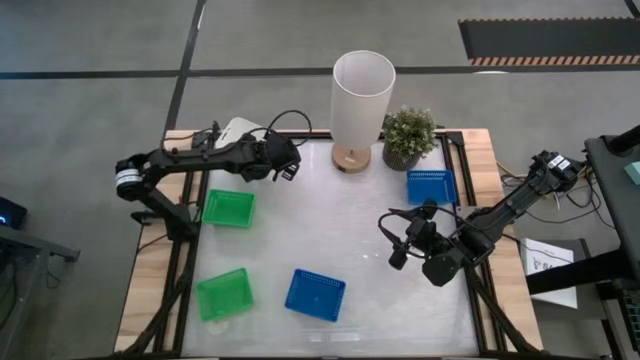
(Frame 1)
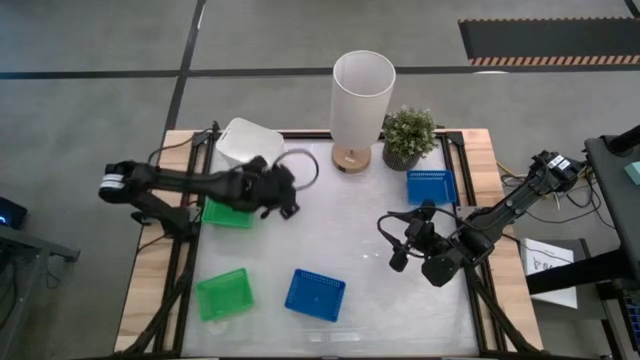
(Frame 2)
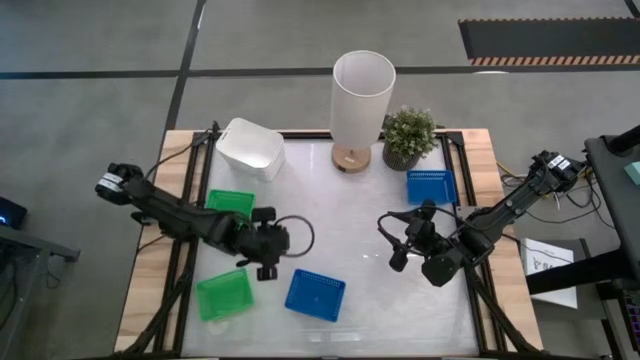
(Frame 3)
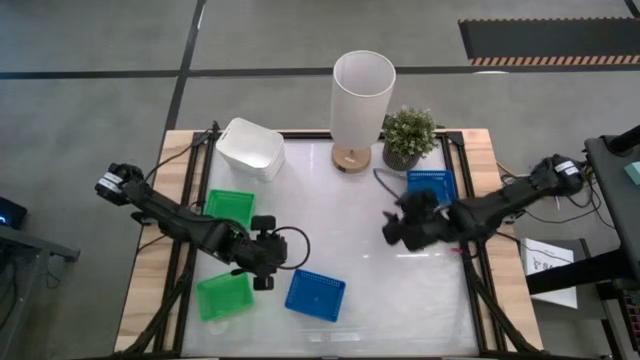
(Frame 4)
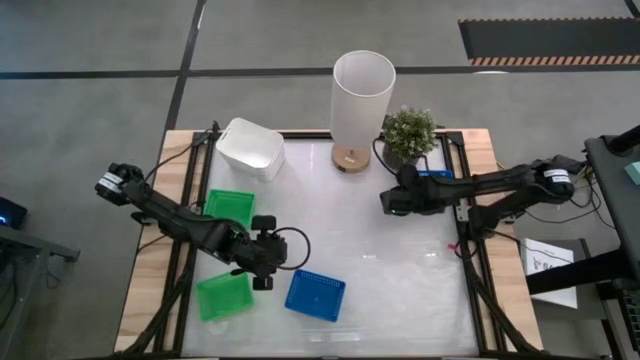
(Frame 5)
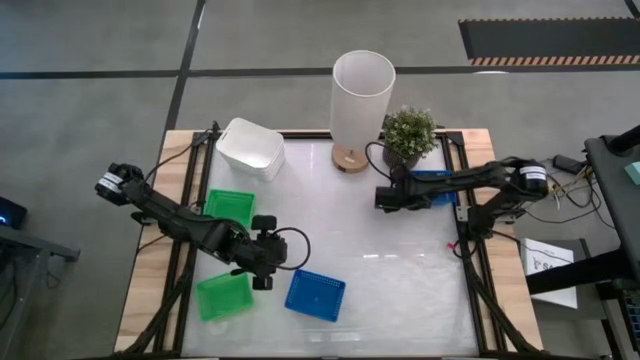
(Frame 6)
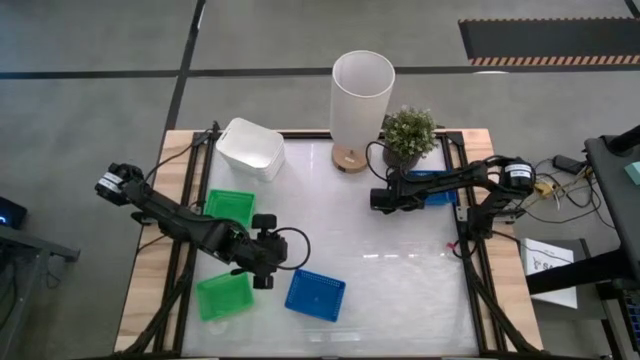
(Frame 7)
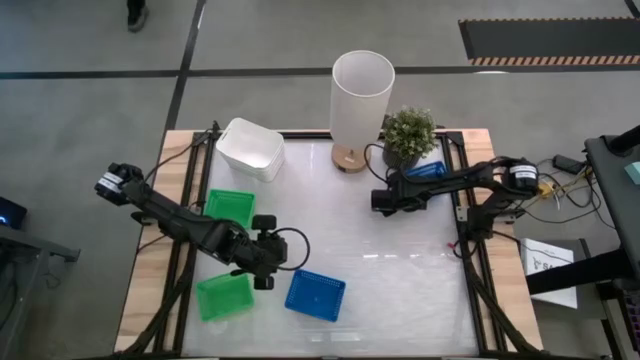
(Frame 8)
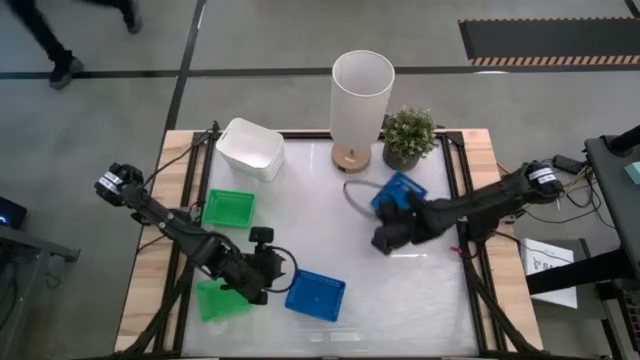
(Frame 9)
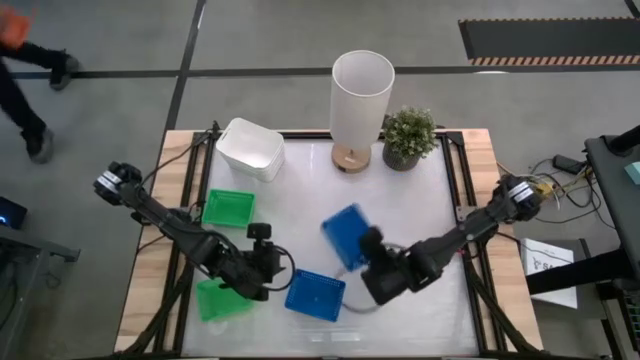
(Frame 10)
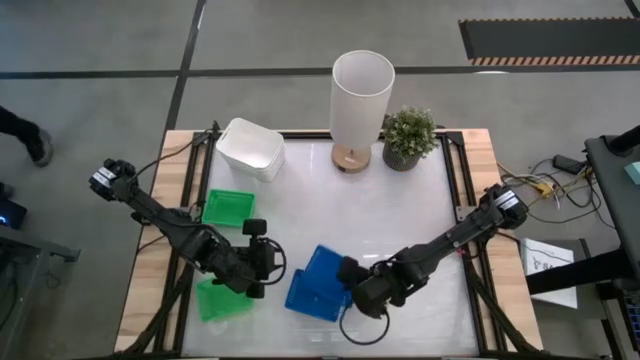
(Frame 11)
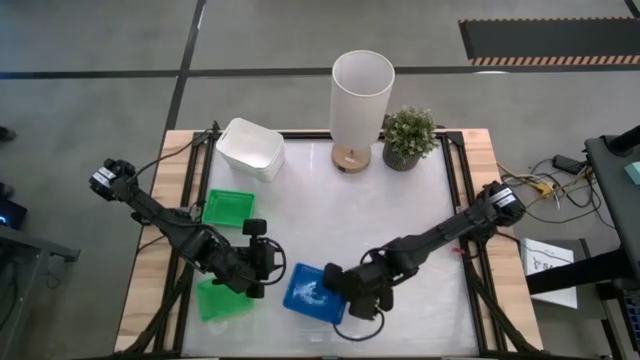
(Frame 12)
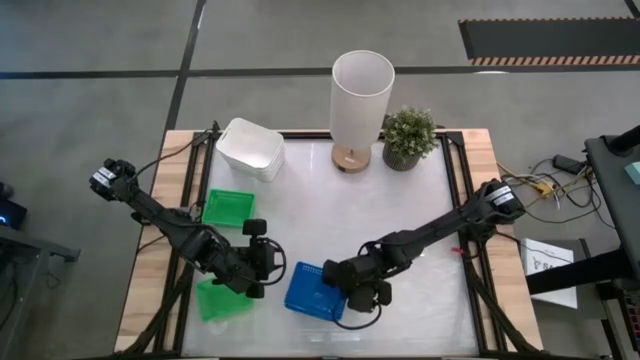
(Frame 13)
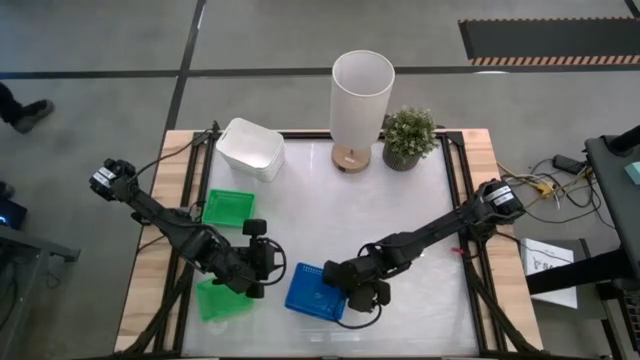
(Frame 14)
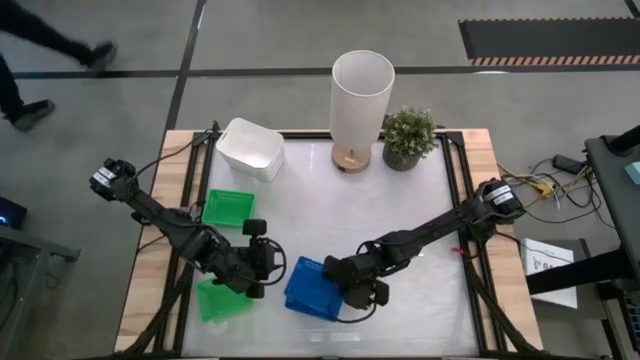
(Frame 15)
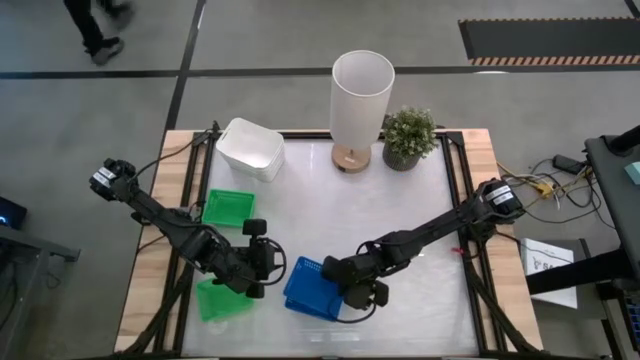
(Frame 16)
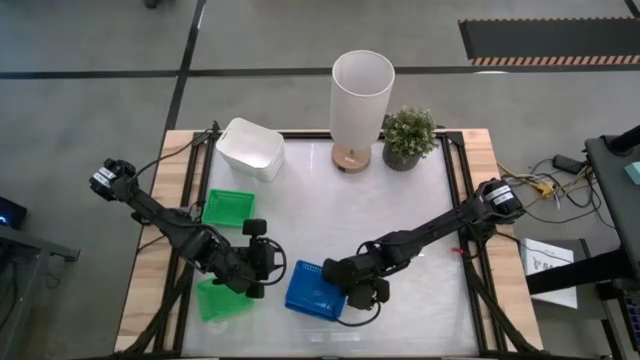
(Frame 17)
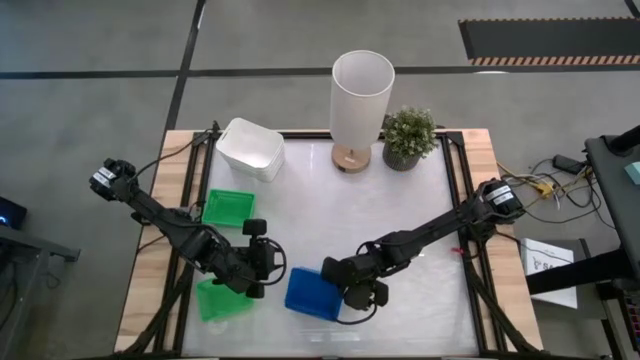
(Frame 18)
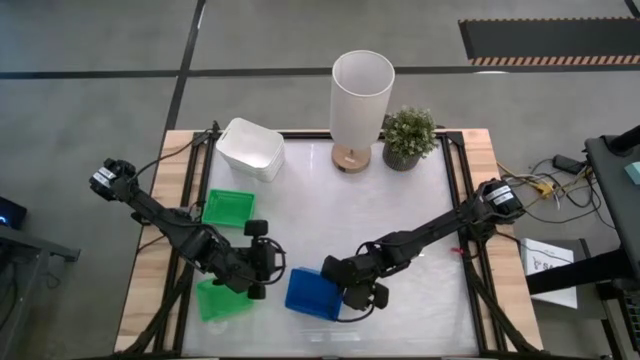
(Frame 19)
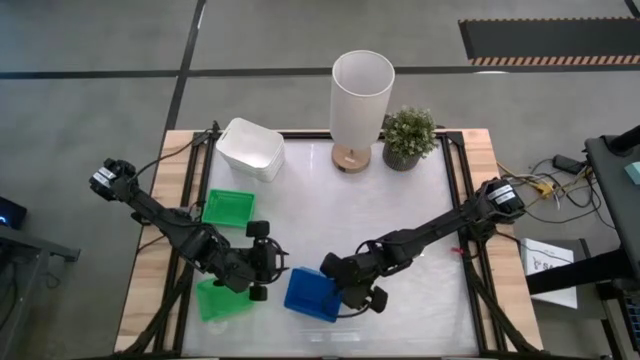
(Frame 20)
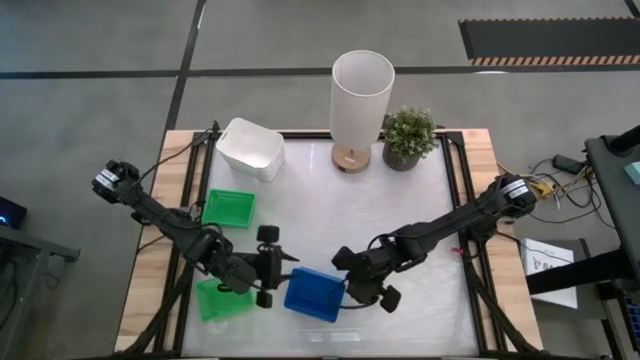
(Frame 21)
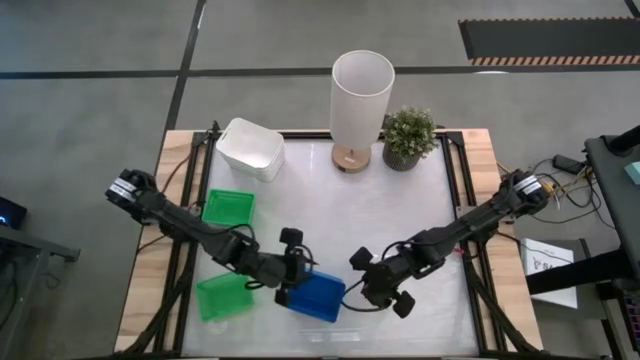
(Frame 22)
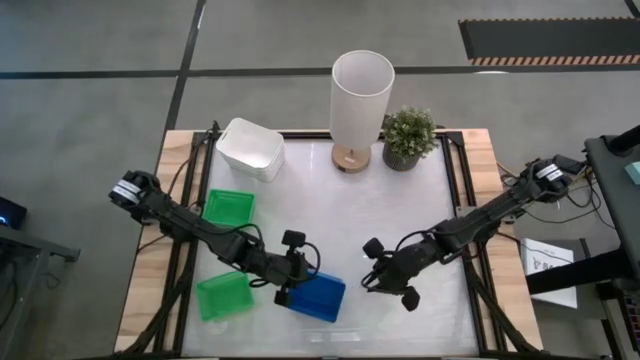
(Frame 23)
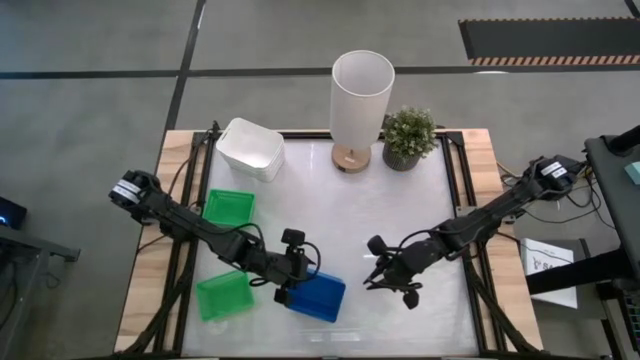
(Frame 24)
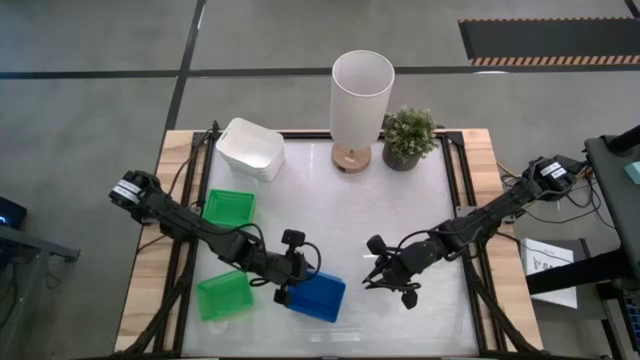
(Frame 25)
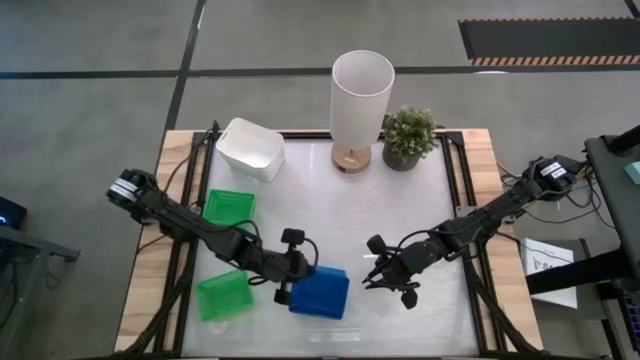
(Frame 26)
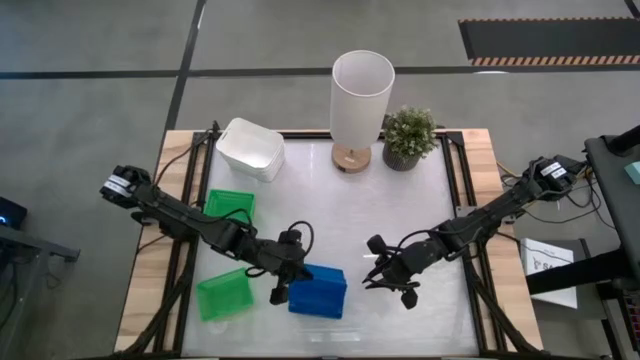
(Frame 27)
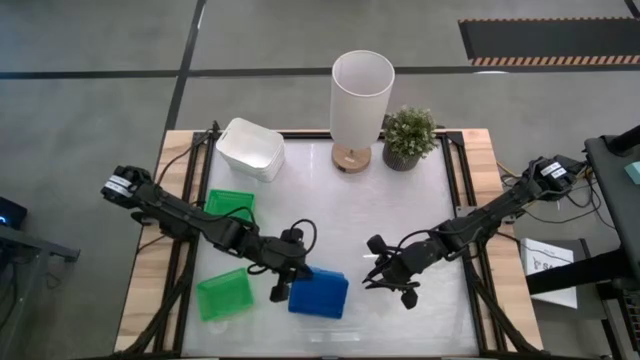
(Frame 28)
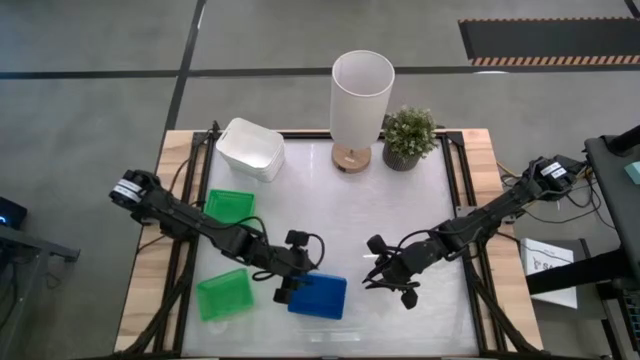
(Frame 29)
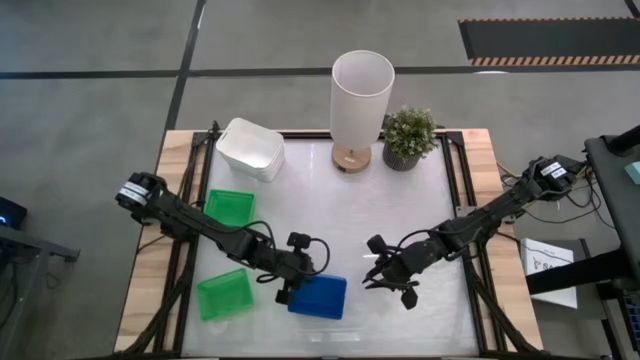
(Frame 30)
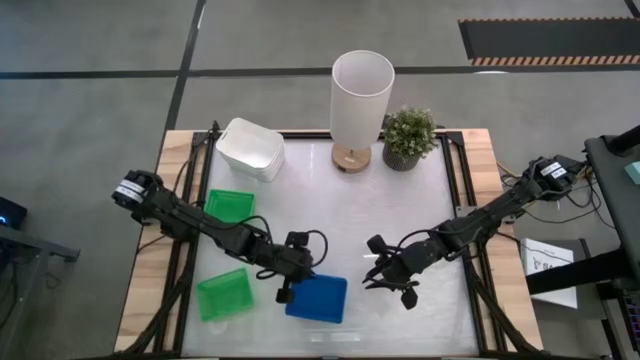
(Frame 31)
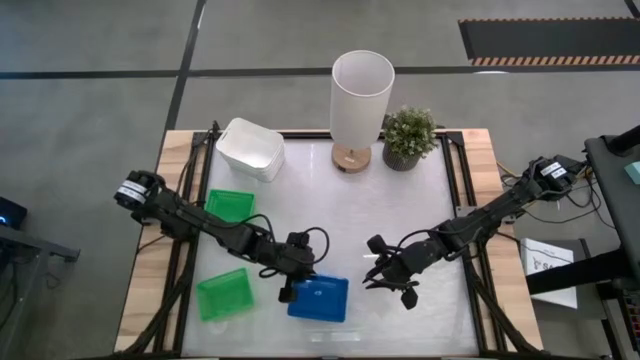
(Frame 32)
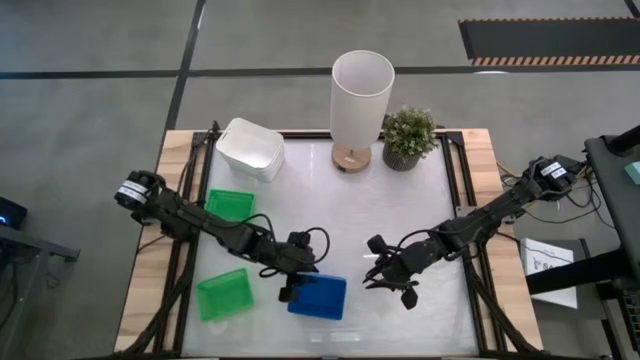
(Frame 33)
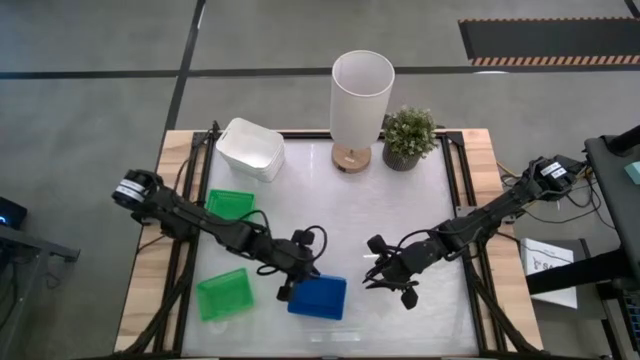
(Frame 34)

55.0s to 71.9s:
Stack the top blue bin on the blue bins

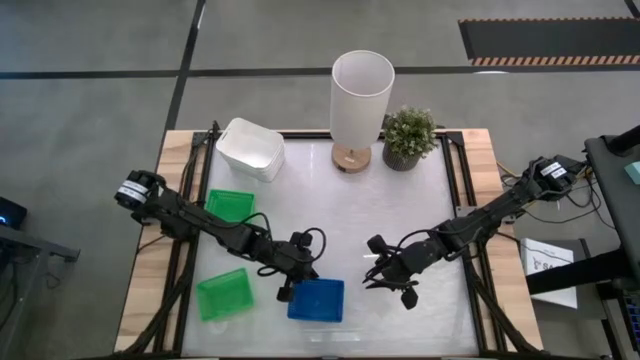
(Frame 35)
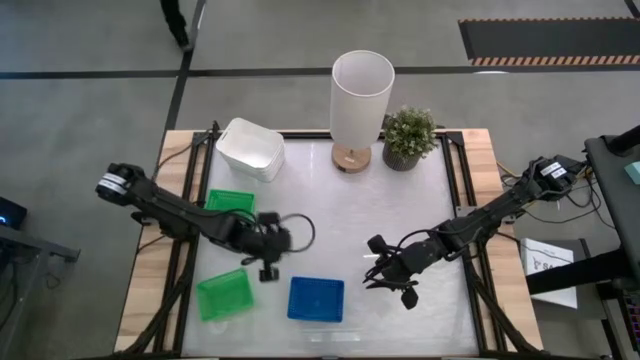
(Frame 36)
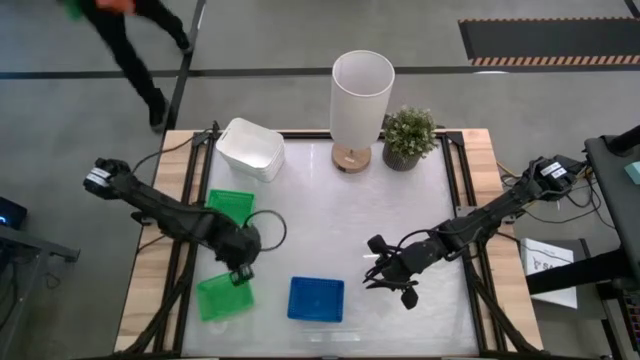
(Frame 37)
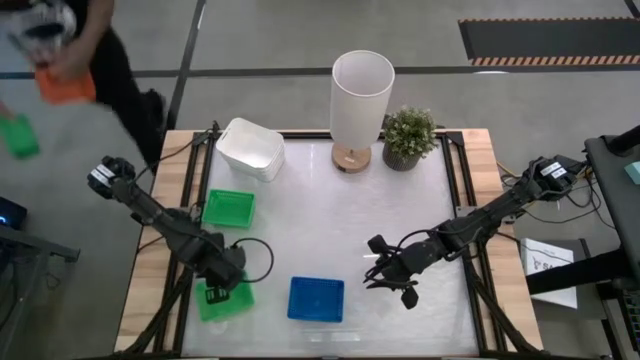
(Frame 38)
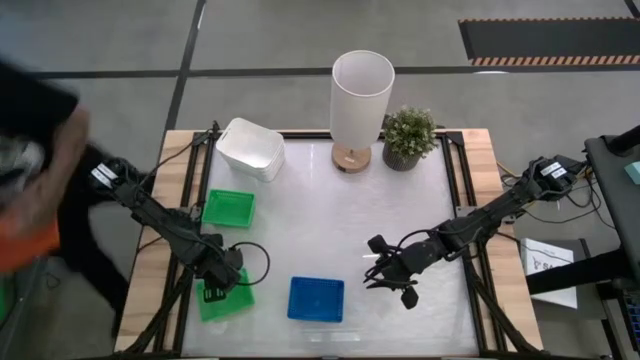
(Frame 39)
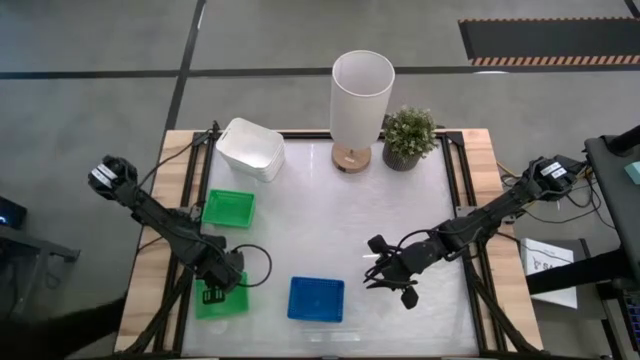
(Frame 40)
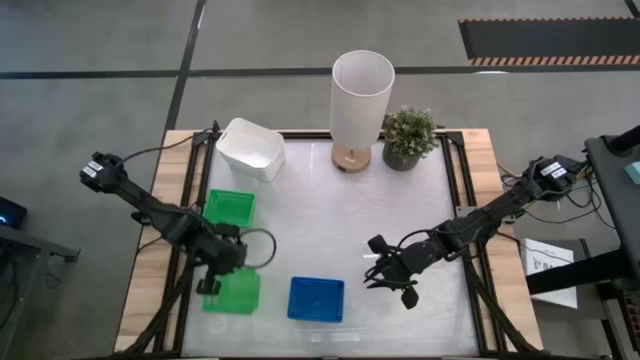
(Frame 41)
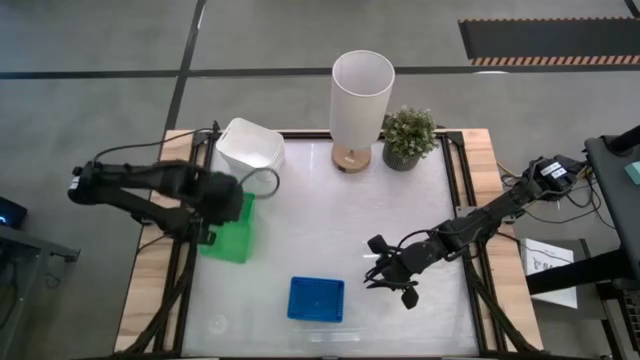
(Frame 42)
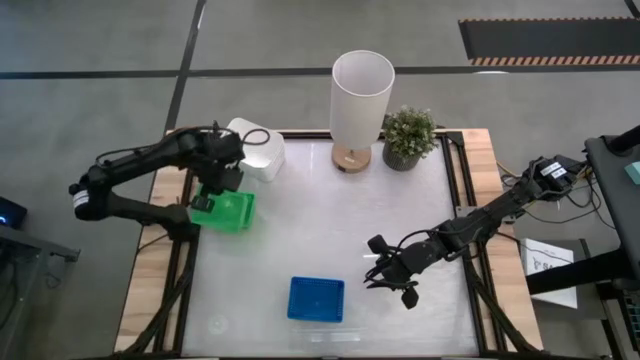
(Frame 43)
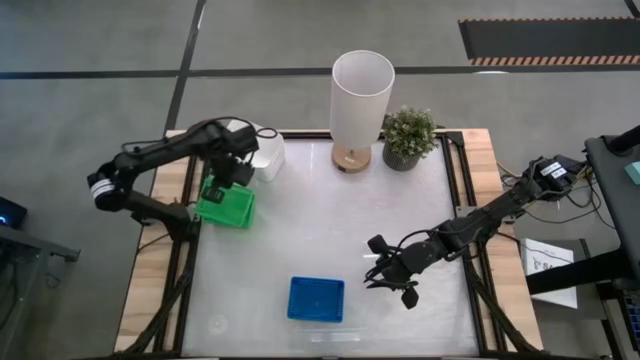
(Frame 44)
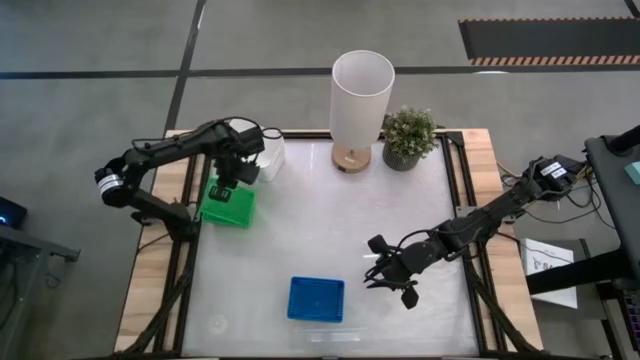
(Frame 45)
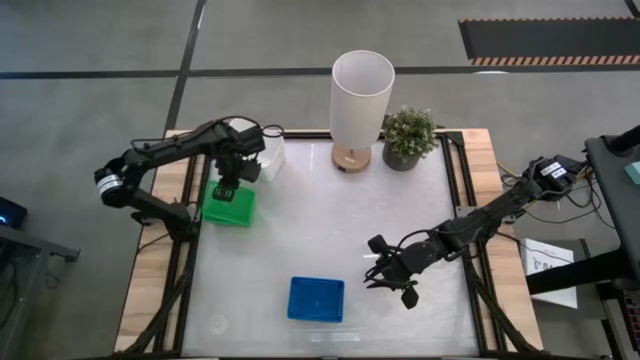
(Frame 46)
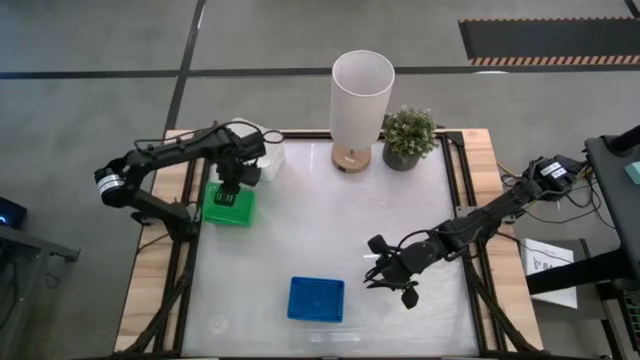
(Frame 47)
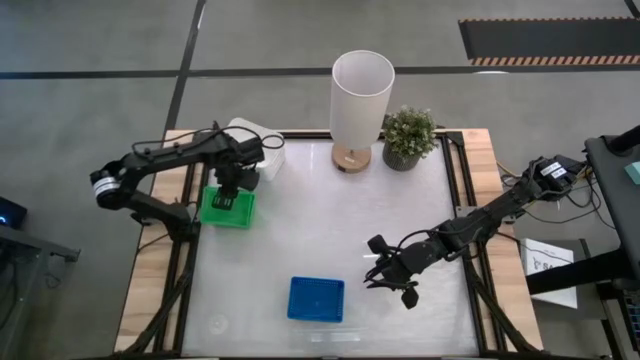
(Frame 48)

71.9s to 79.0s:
Stack the bottom green bin on the green bins
